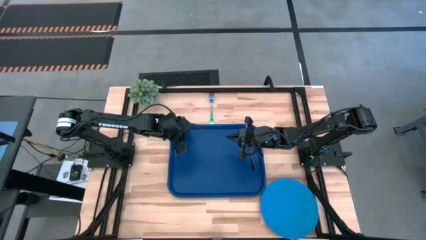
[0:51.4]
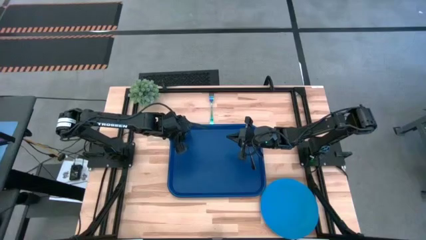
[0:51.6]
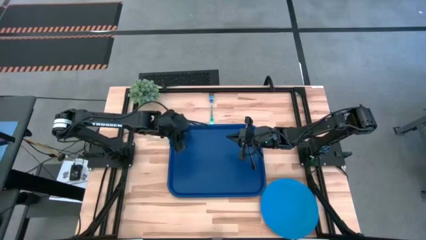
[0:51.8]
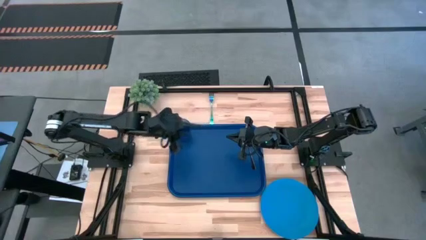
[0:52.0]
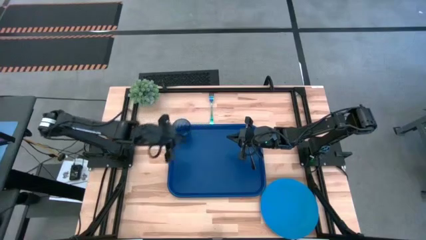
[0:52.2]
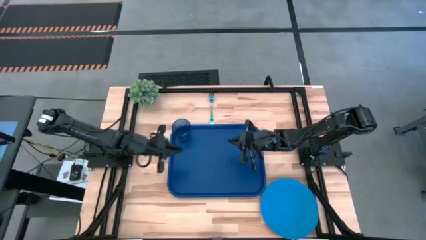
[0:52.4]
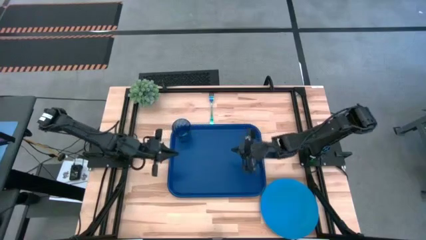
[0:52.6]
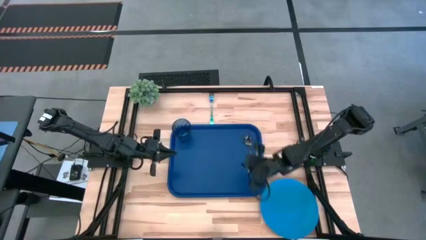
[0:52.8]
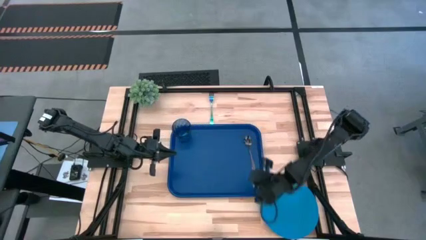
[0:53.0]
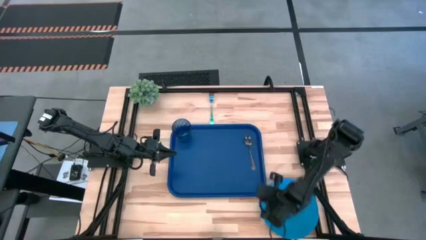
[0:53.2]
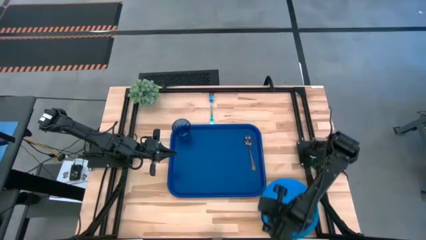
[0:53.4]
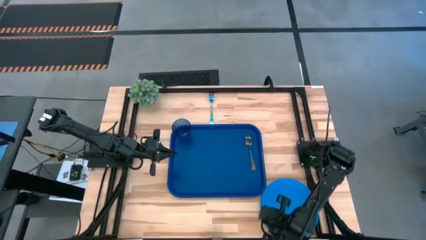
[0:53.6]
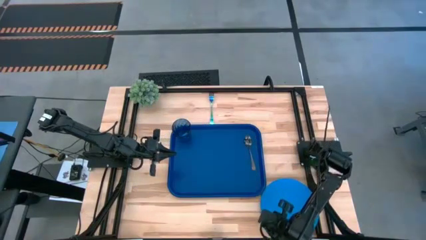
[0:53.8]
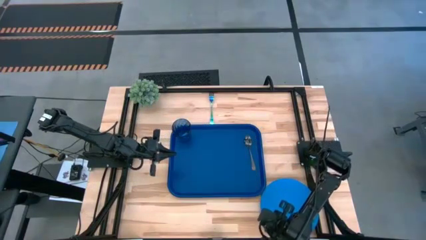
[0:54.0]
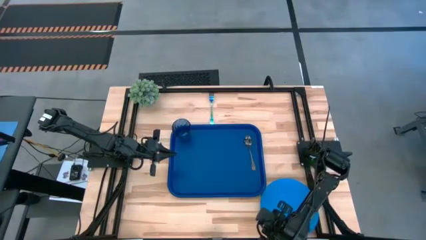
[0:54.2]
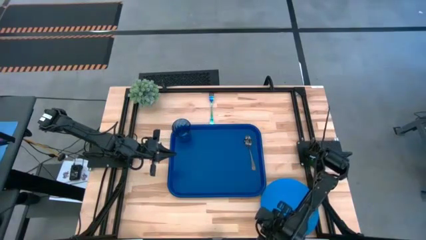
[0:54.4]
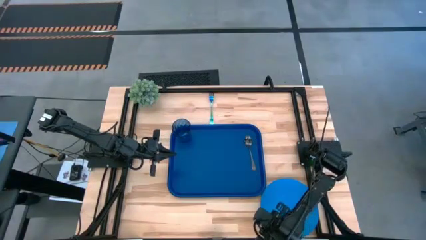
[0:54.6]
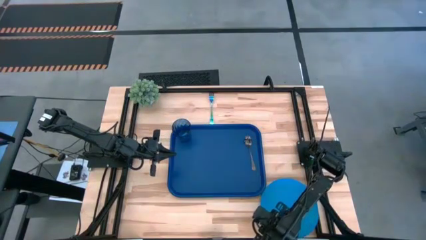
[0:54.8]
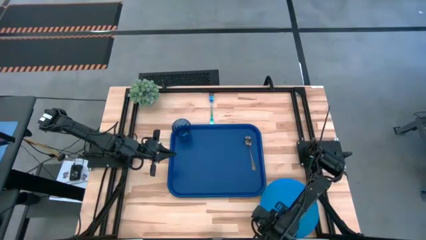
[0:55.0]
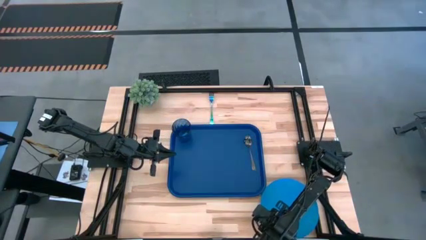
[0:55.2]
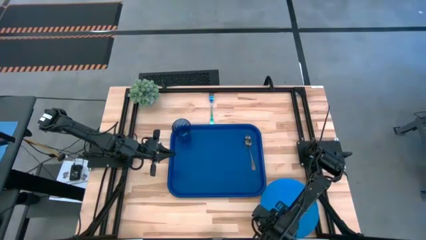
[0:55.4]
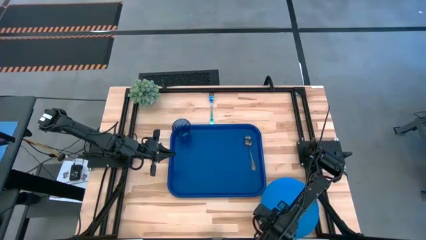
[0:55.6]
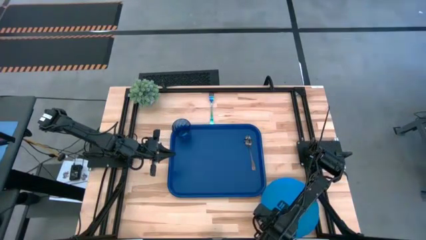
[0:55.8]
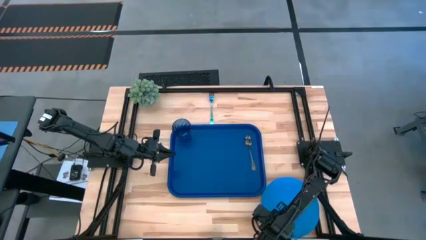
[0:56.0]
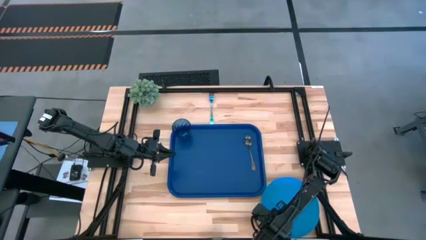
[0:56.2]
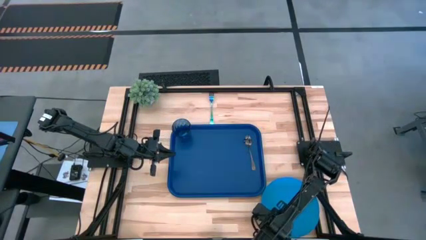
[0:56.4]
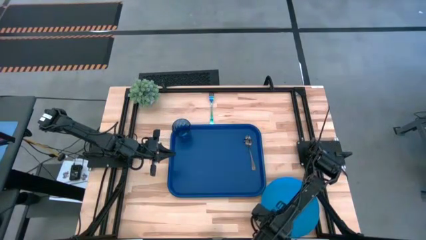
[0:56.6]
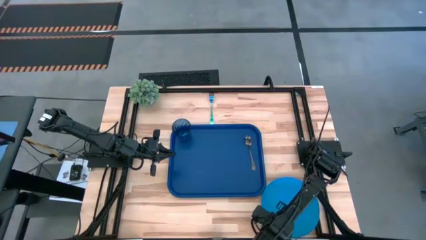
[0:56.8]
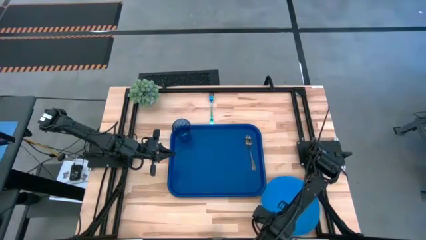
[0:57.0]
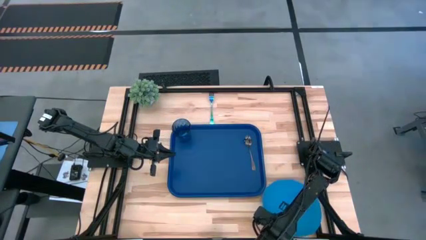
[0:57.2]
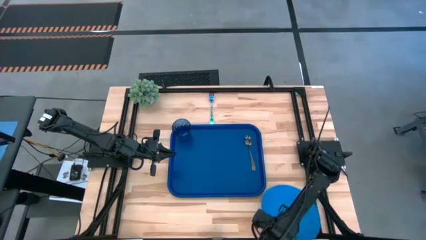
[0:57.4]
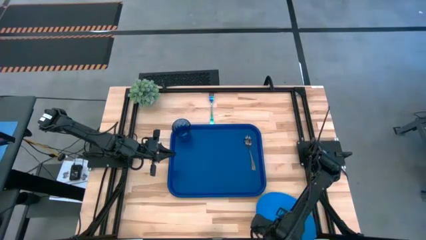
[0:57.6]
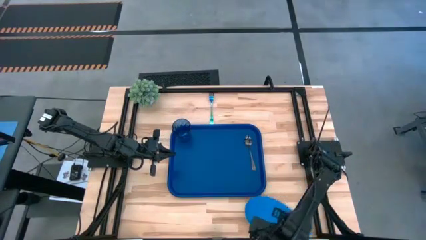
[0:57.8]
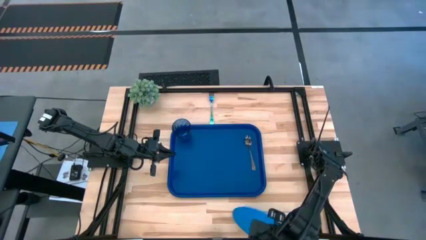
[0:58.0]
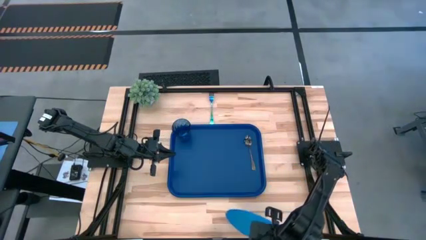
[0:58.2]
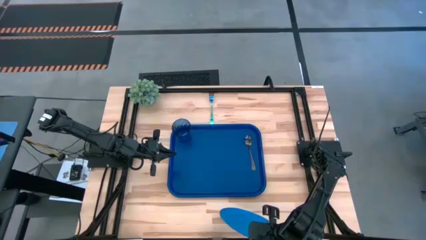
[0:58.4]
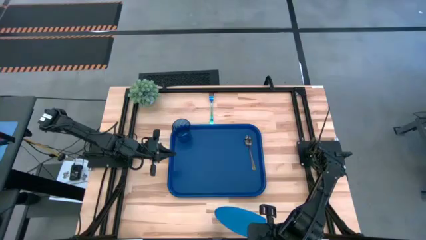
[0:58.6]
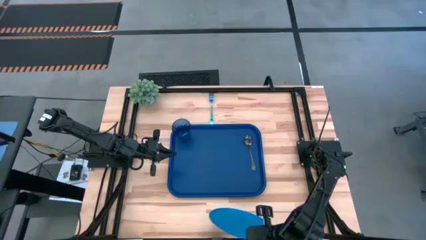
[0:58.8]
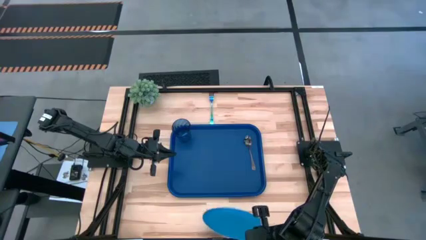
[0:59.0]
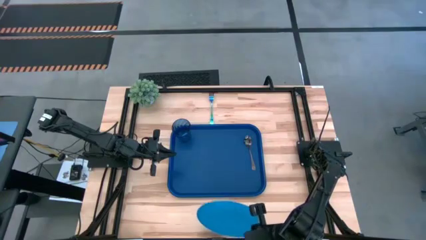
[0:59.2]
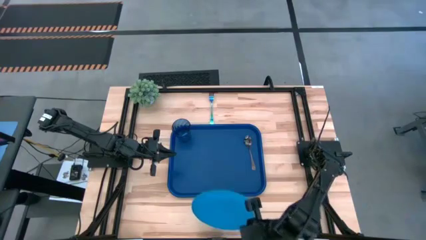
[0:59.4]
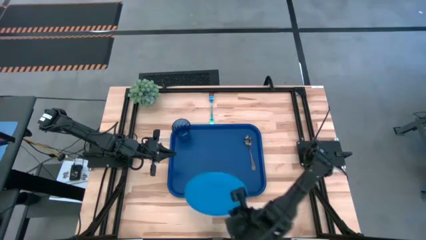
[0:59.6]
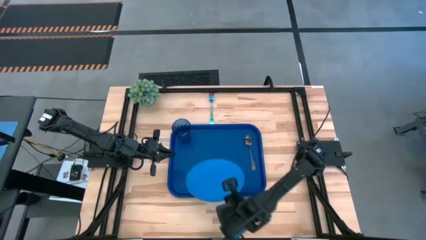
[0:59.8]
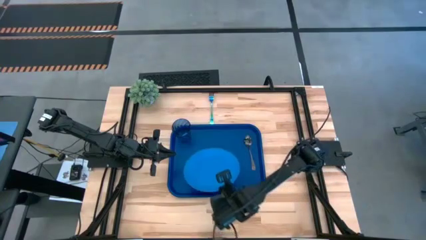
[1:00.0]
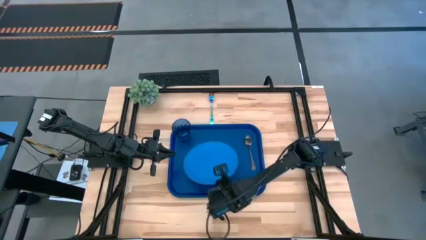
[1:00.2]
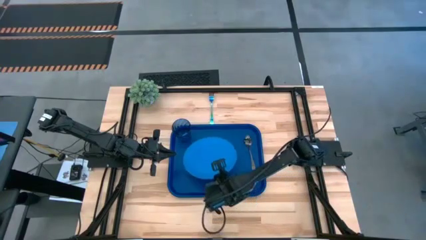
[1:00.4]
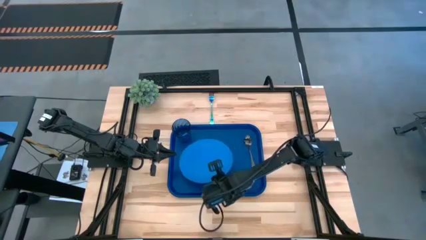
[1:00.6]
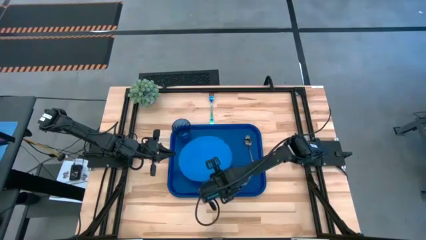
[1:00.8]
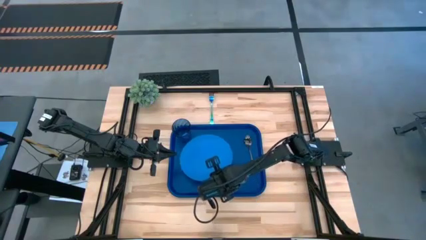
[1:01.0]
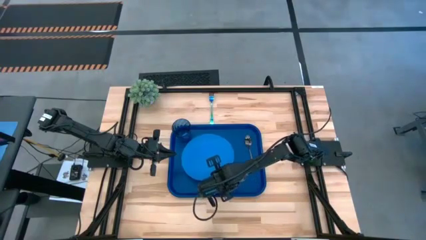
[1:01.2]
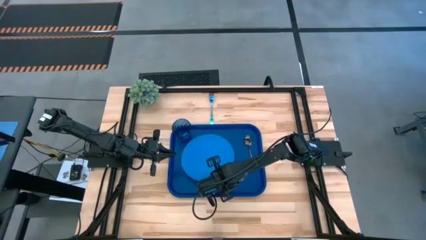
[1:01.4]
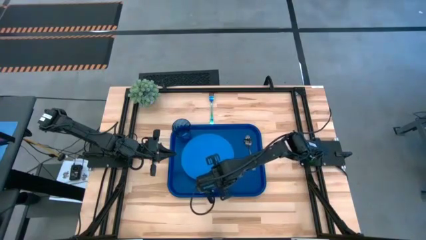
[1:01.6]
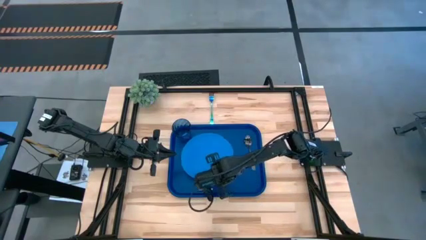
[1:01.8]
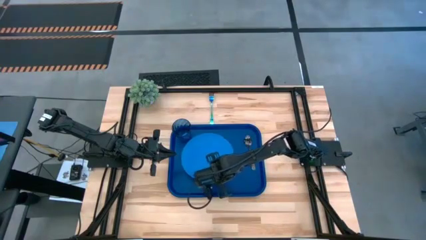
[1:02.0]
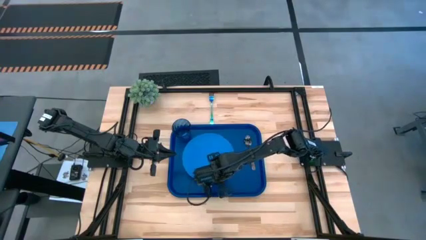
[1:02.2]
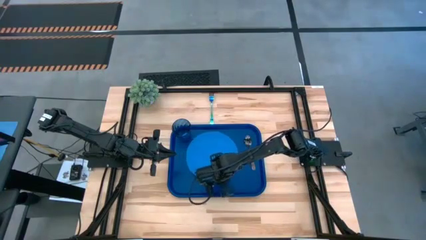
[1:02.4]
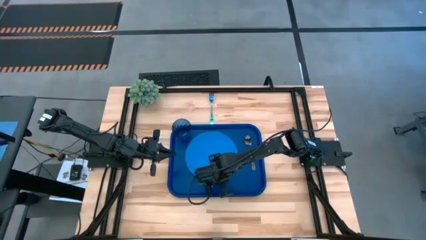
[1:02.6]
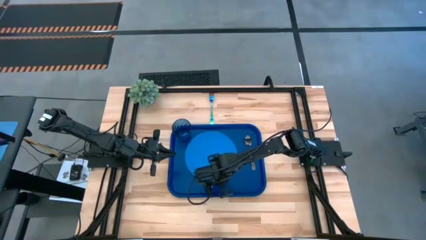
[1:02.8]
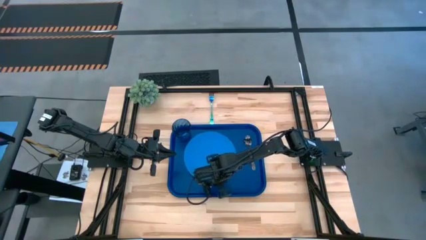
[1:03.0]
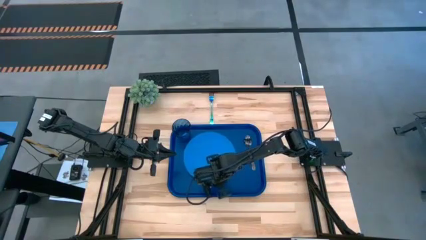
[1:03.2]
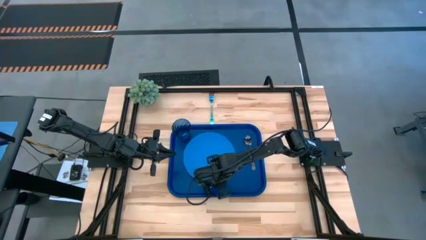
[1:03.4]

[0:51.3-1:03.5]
Task: Pick and place plate/cup/fork/spoon on tray
Put the blue plate on the blue tray

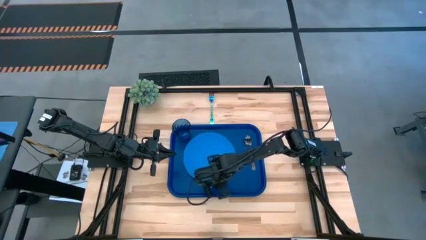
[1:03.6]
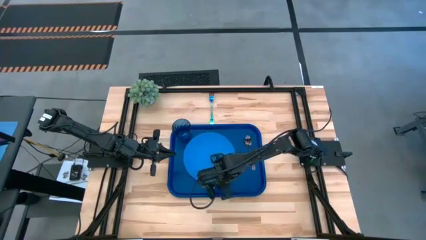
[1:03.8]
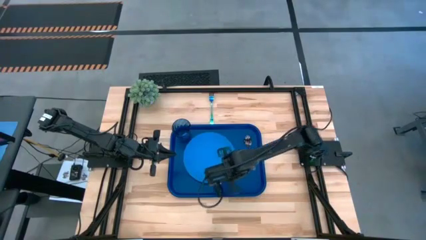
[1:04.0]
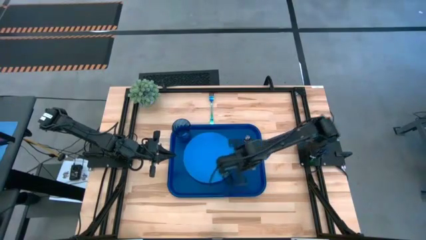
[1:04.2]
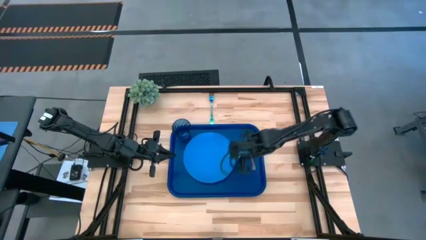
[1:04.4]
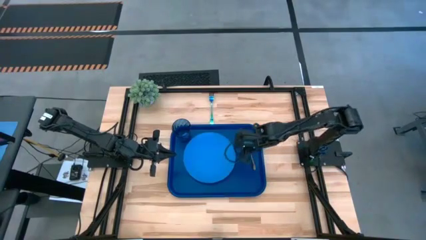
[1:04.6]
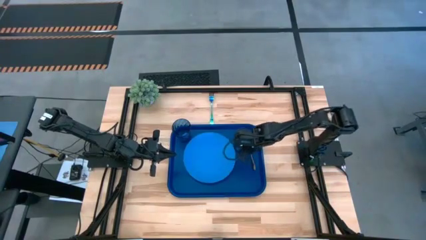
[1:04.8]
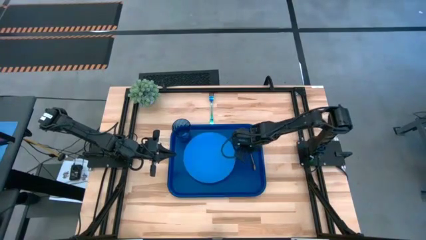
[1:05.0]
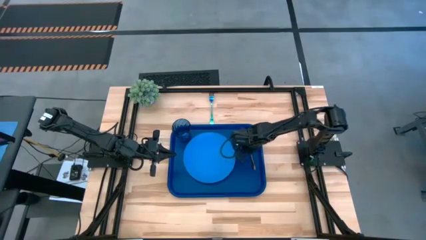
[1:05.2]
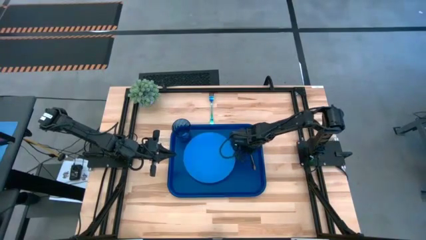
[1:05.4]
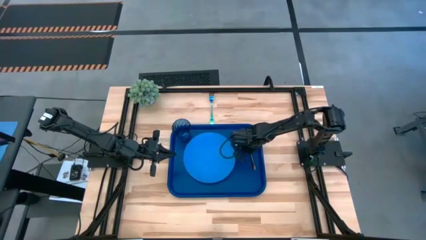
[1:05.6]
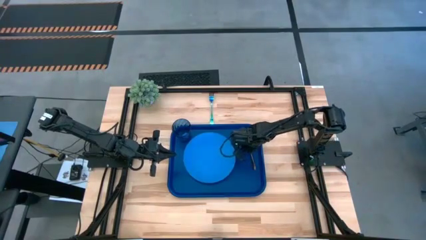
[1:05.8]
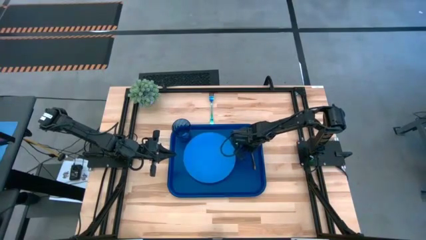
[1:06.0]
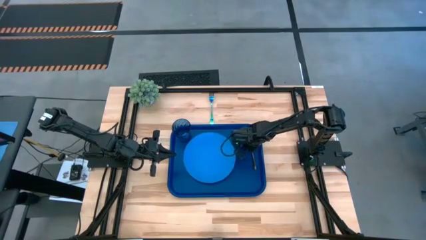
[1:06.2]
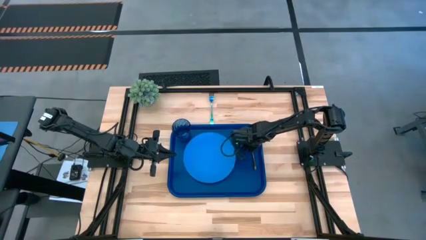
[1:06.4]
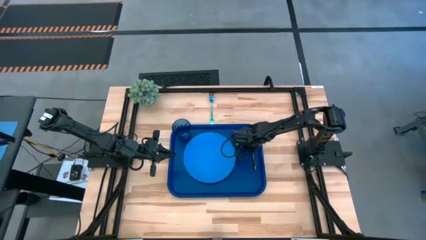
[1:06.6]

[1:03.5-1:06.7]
Adjust the black spoon on the blue tray
